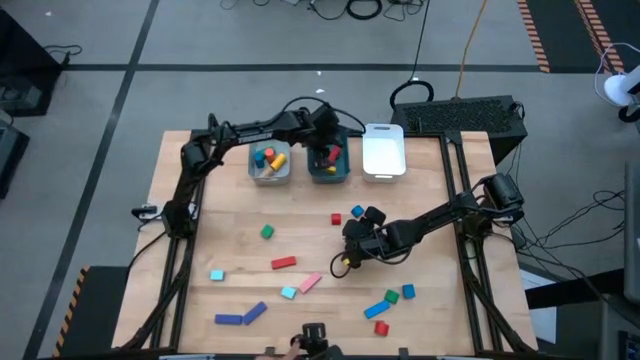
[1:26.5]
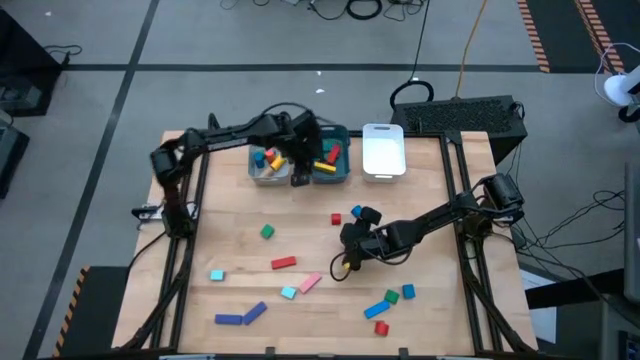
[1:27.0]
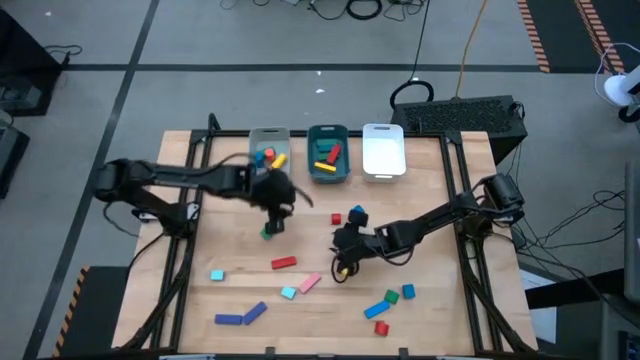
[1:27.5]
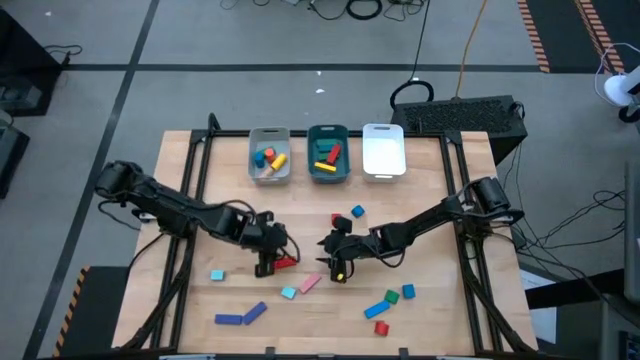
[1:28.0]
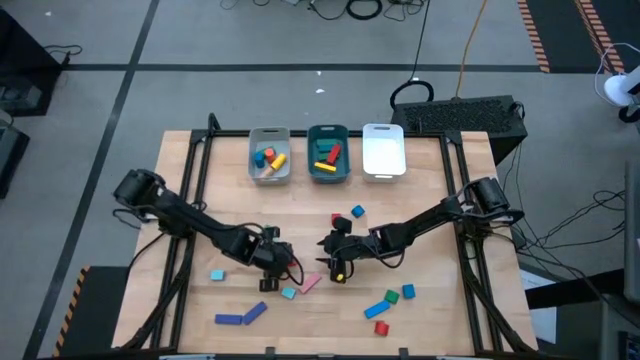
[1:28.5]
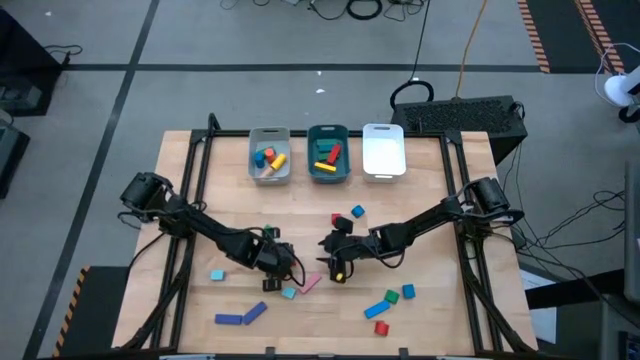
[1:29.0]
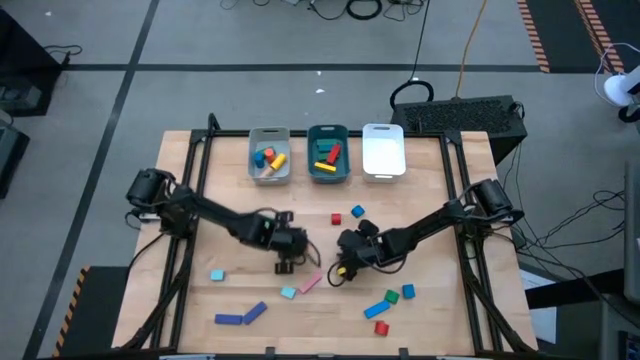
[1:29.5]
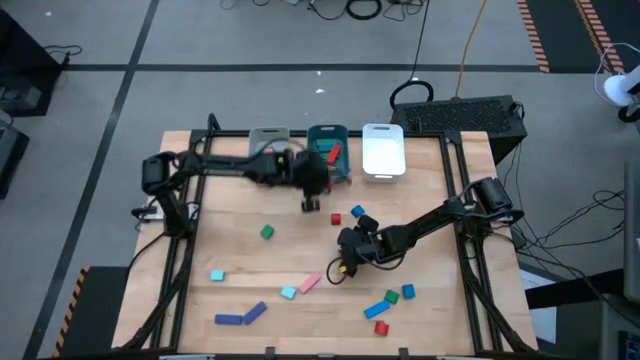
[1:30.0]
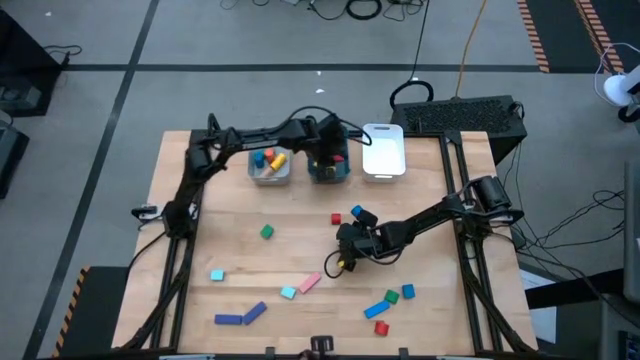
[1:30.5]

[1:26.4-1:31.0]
Task: Sort blocks by size
Put the red rectangle block into the blue bin

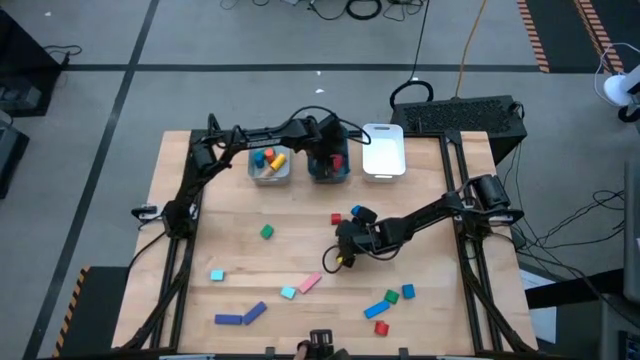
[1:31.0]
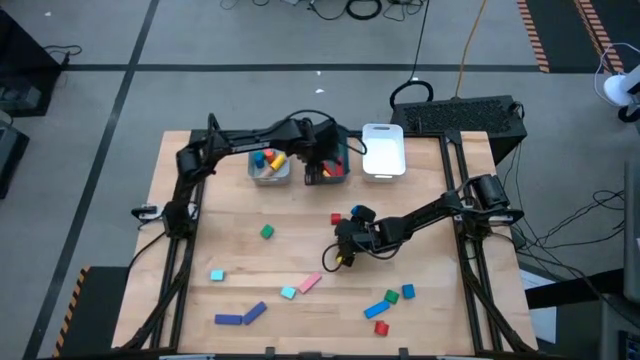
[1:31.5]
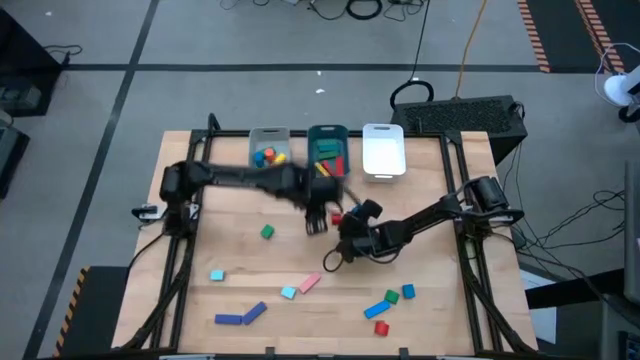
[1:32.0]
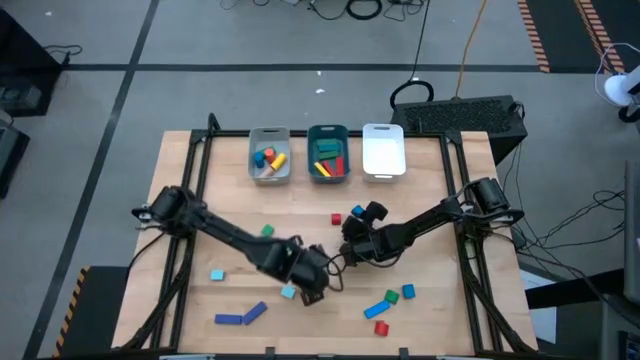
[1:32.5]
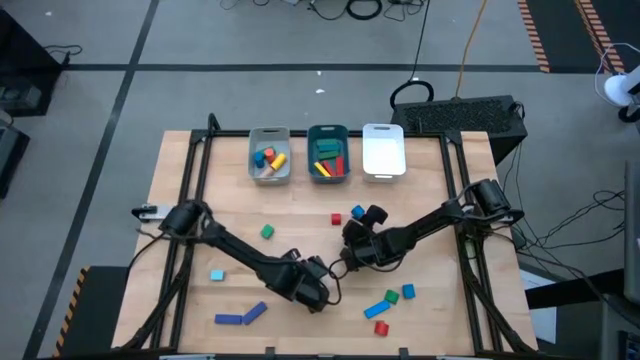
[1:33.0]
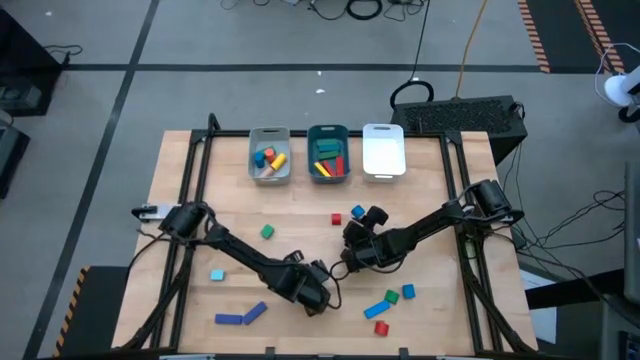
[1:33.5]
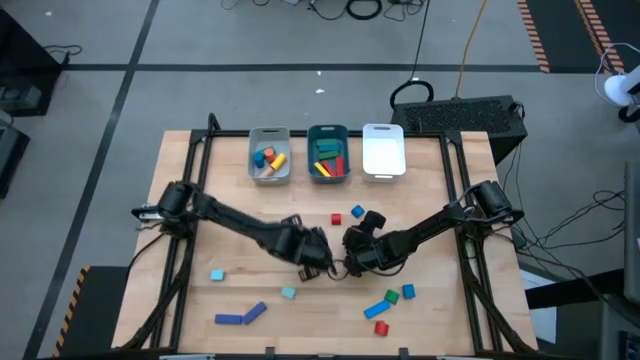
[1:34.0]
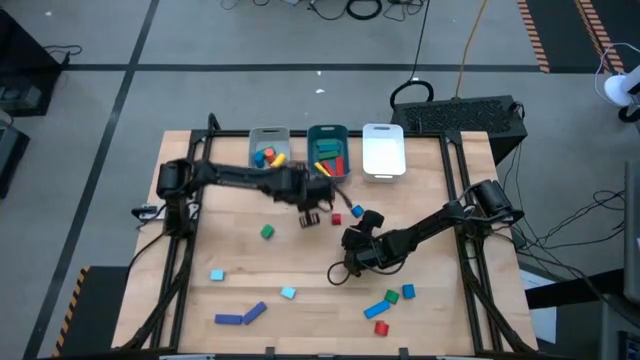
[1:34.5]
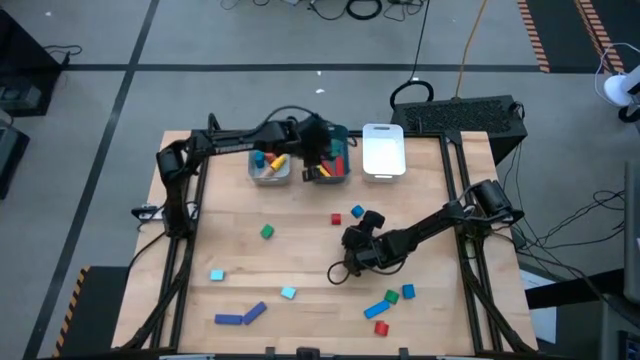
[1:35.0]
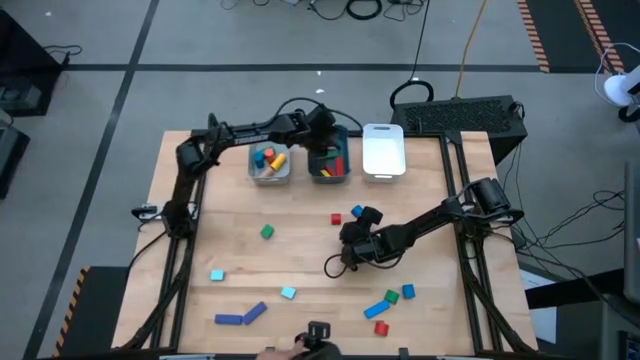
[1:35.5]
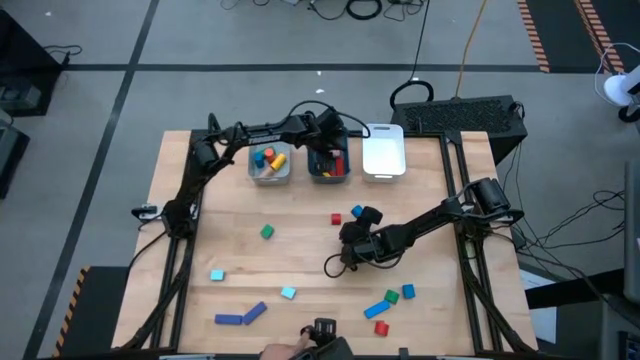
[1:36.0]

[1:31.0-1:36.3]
Put the pink rectangle block into the blue bin

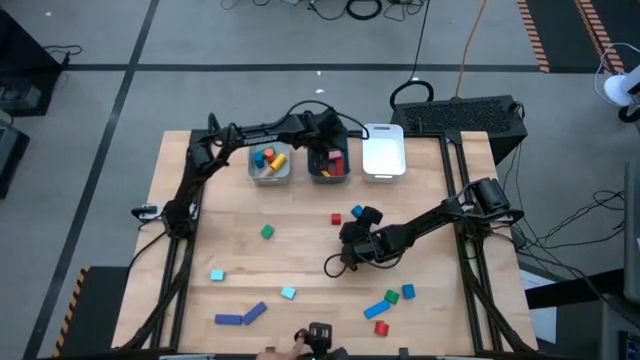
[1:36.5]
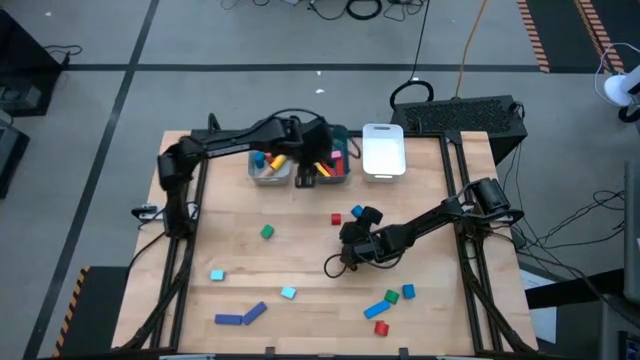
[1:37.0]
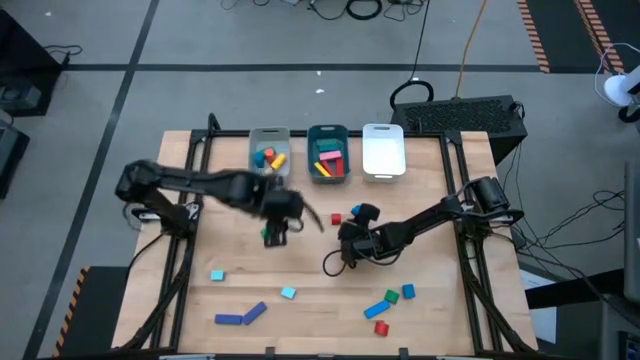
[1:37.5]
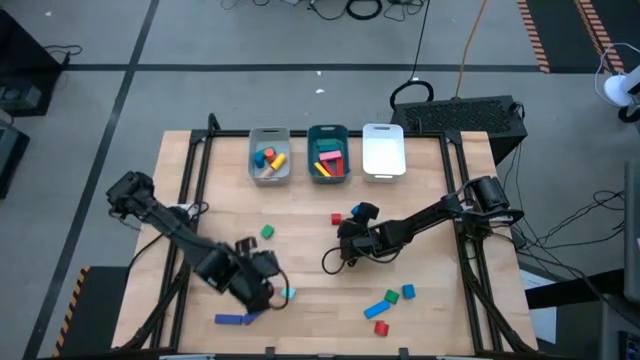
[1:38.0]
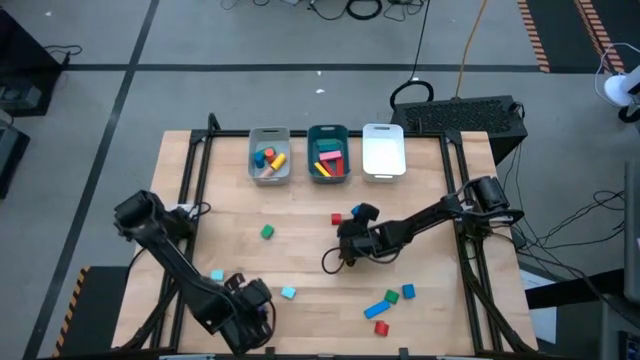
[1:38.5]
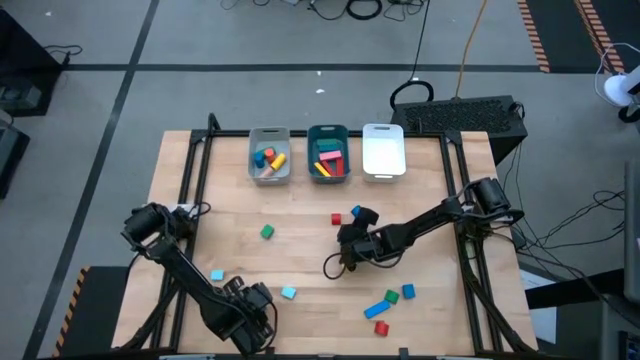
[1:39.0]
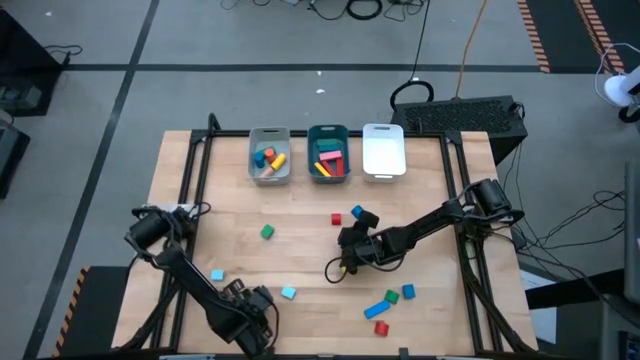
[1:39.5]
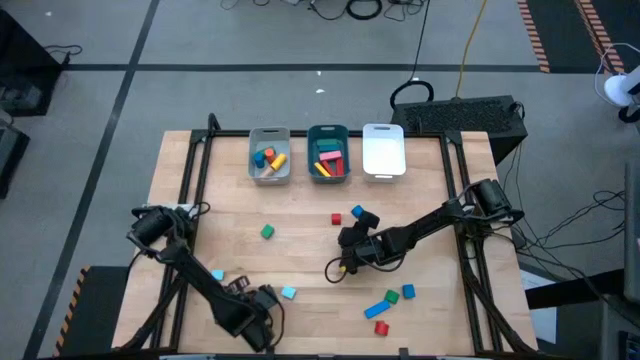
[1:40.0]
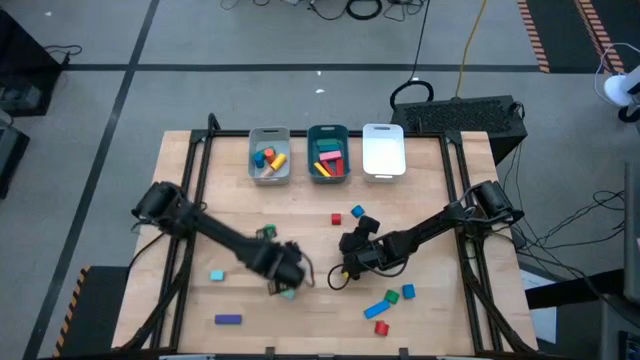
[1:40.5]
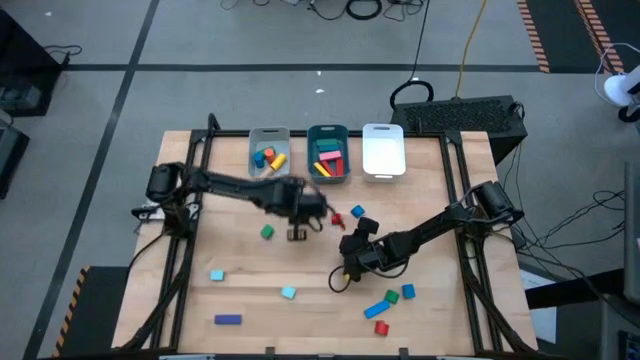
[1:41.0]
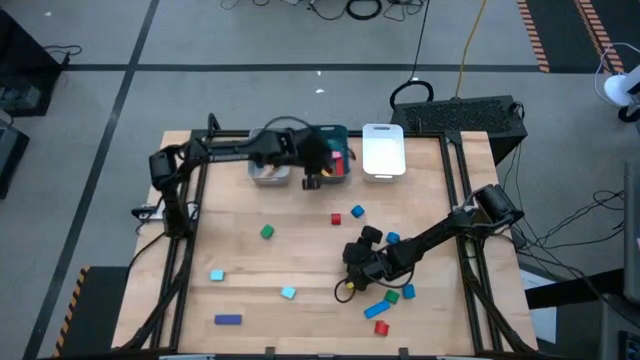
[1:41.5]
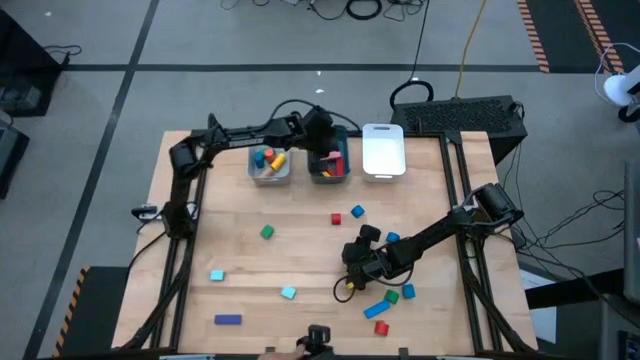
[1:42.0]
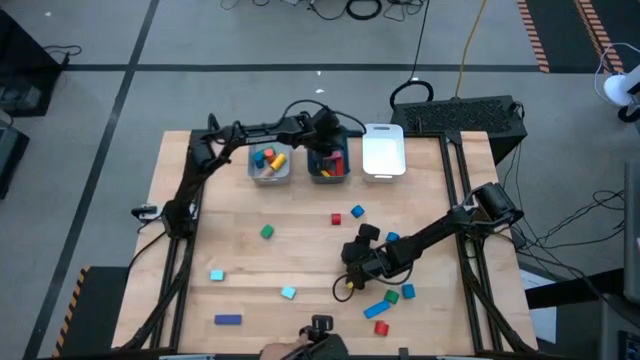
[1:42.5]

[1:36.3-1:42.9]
Put the right purple rectangle block into the blue bin

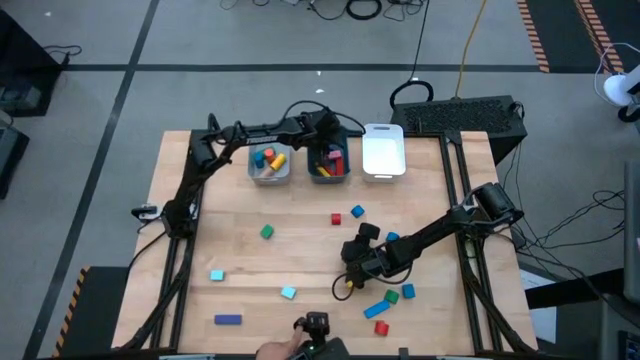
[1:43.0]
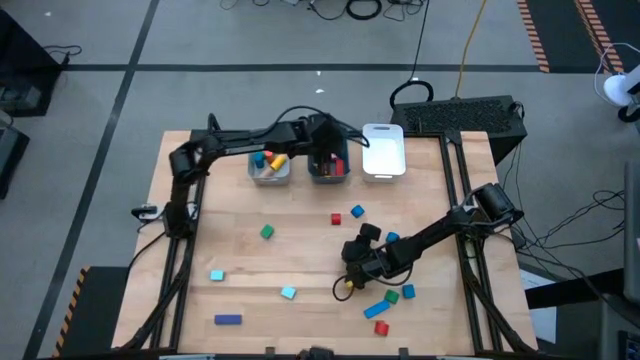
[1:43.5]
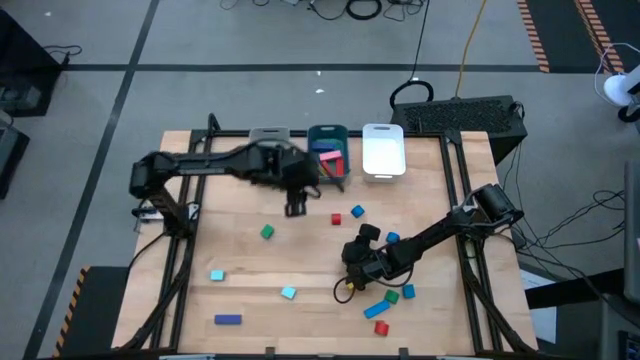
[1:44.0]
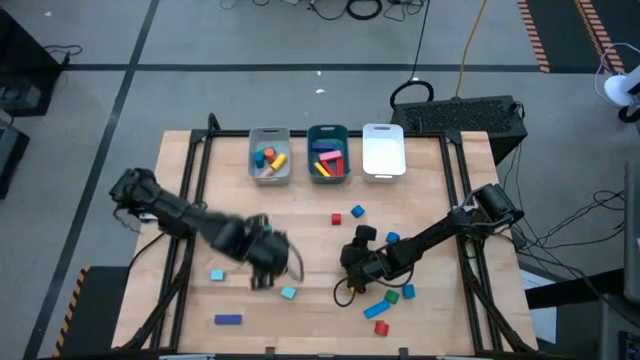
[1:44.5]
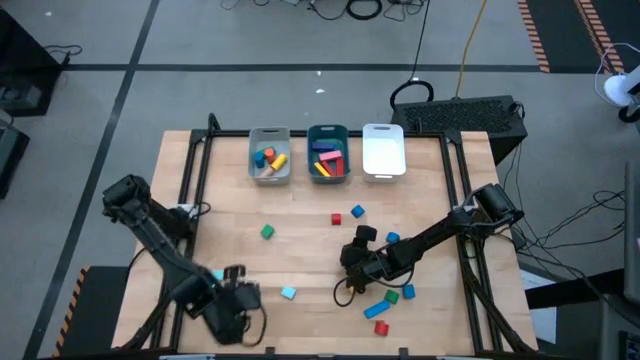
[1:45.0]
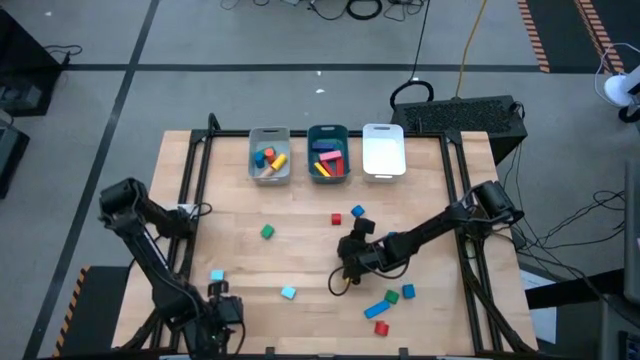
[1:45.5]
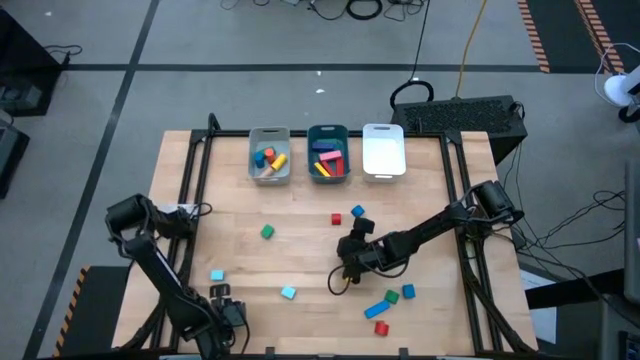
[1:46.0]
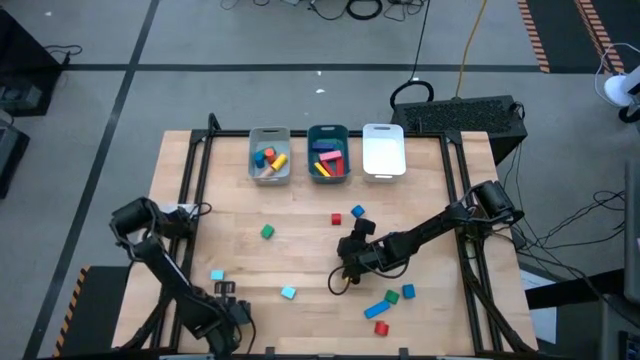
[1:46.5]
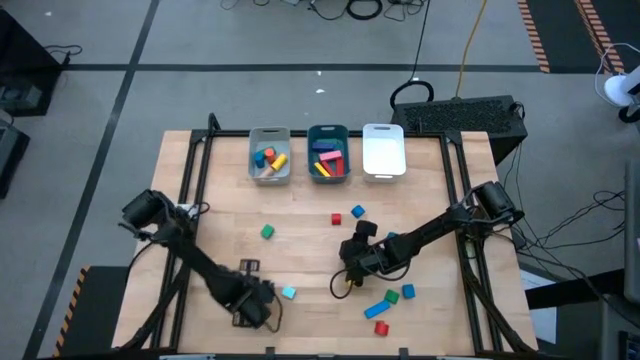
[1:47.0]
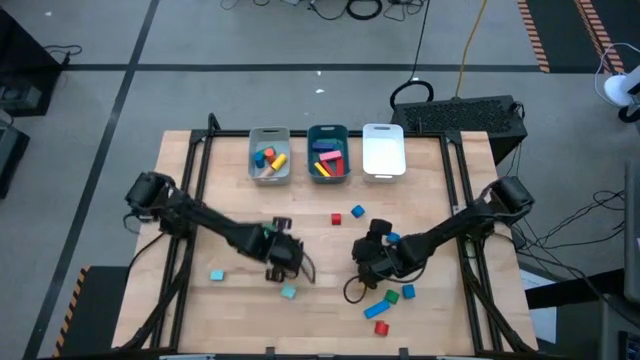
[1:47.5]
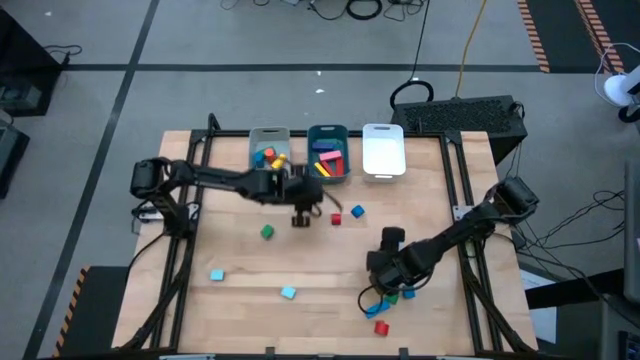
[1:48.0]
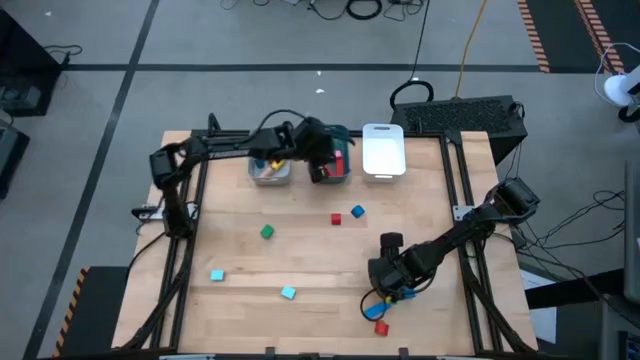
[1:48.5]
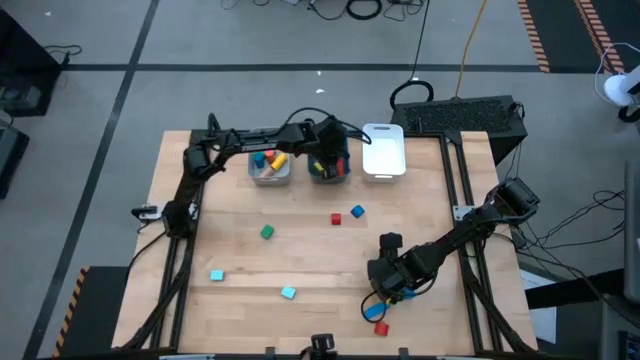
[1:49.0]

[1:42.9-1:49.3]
Put the purple rectangle block into the blue bin
